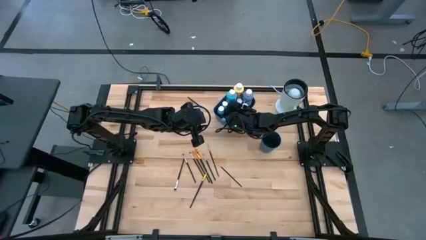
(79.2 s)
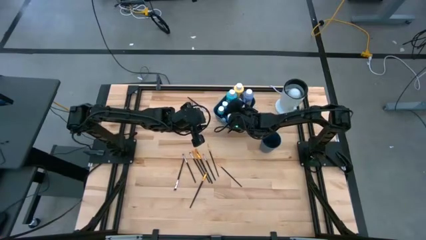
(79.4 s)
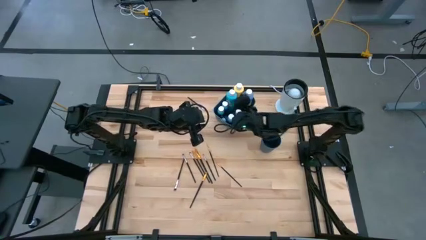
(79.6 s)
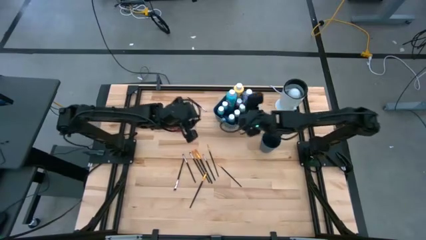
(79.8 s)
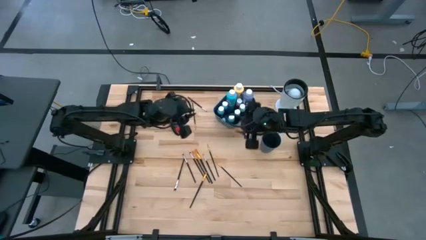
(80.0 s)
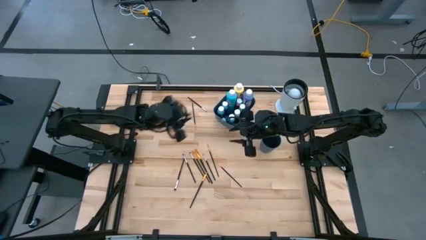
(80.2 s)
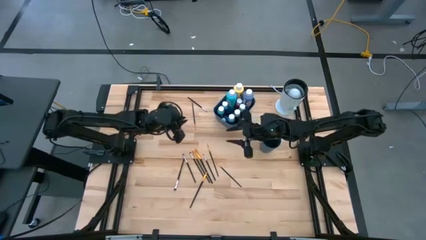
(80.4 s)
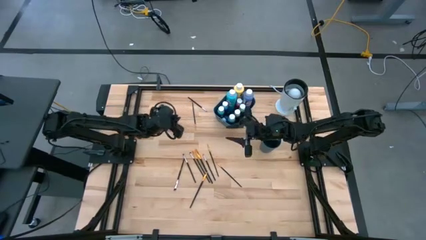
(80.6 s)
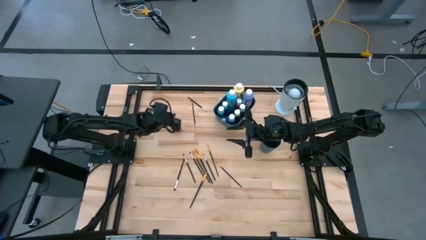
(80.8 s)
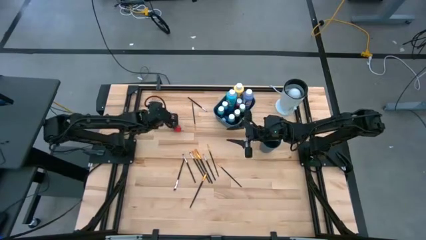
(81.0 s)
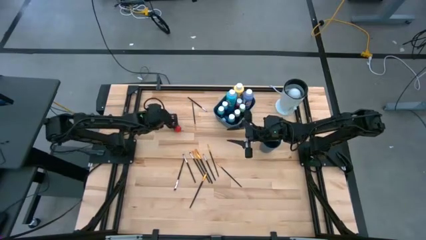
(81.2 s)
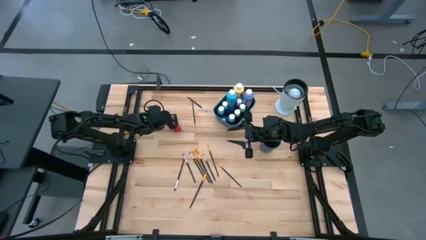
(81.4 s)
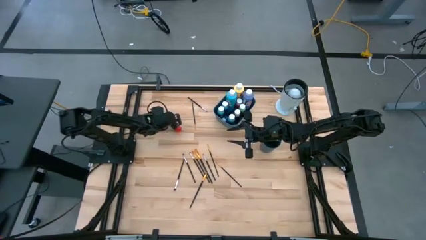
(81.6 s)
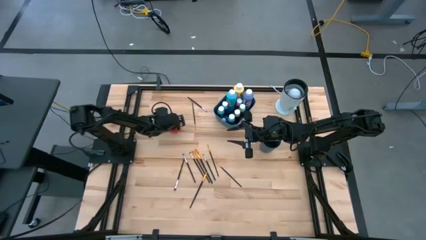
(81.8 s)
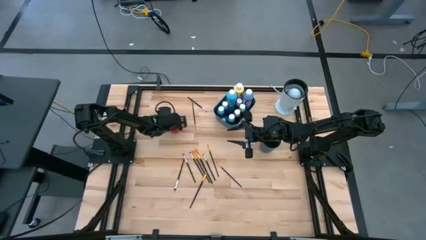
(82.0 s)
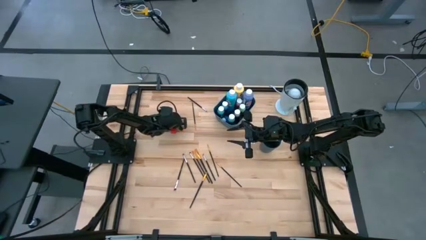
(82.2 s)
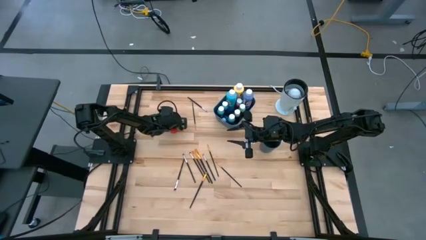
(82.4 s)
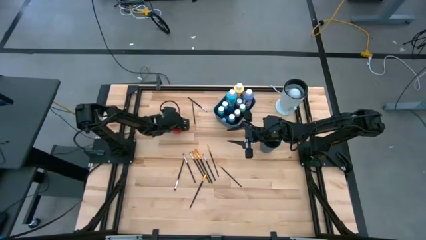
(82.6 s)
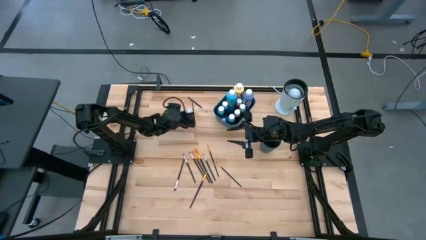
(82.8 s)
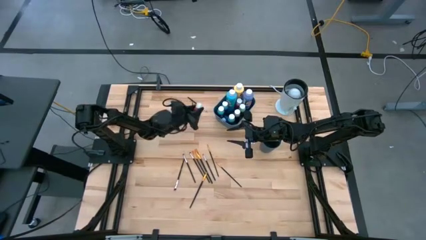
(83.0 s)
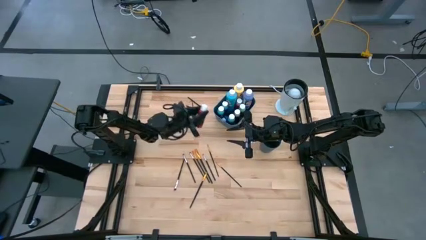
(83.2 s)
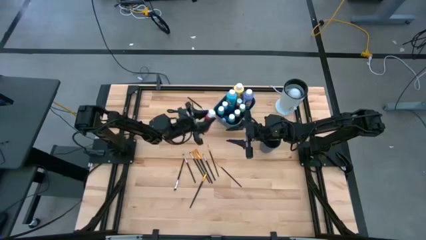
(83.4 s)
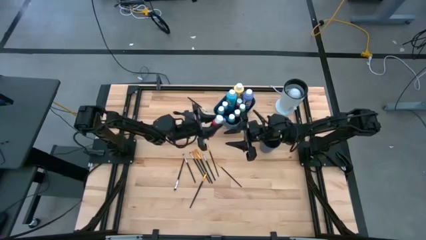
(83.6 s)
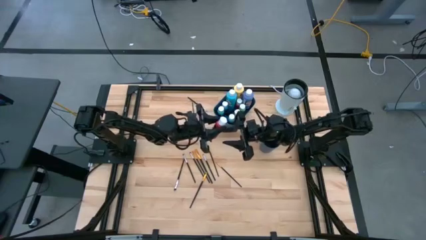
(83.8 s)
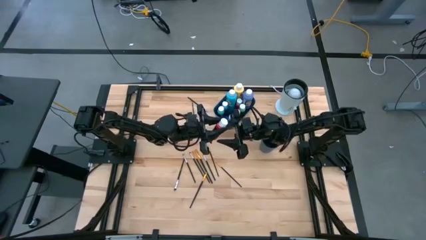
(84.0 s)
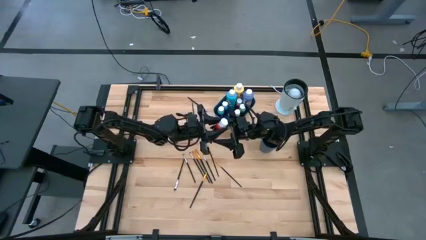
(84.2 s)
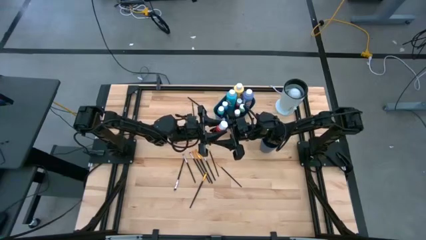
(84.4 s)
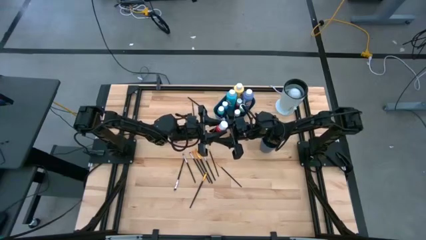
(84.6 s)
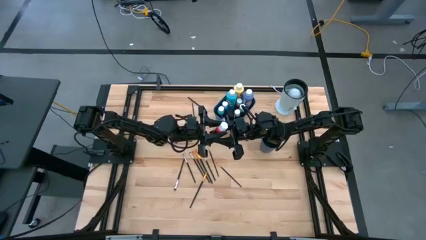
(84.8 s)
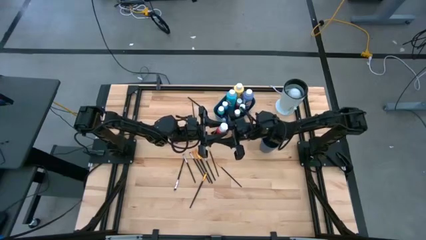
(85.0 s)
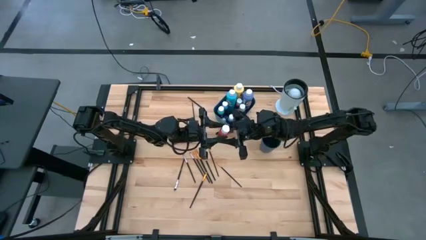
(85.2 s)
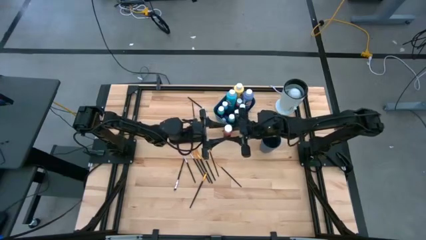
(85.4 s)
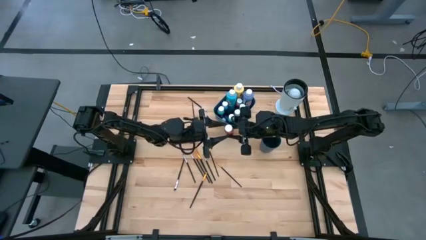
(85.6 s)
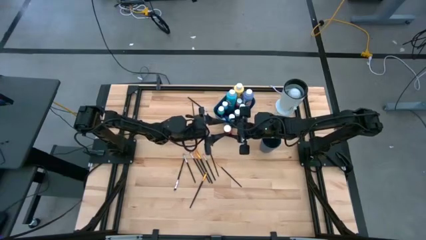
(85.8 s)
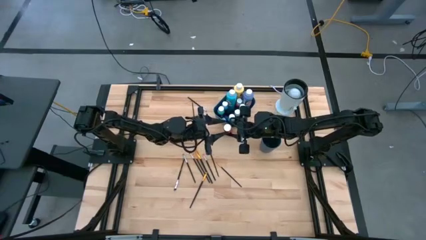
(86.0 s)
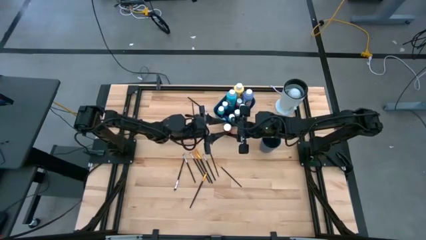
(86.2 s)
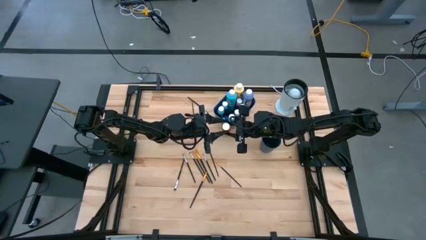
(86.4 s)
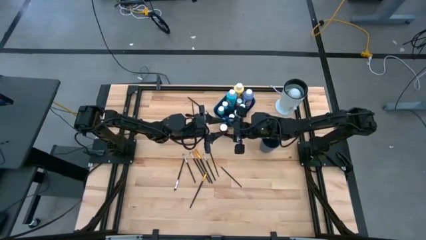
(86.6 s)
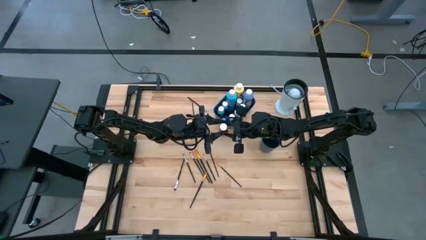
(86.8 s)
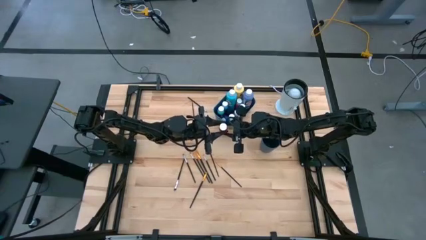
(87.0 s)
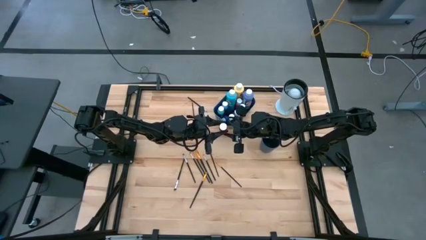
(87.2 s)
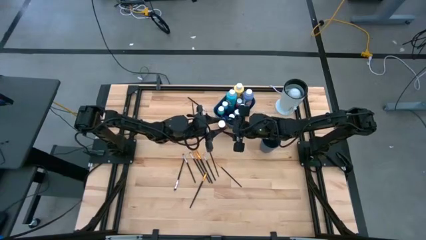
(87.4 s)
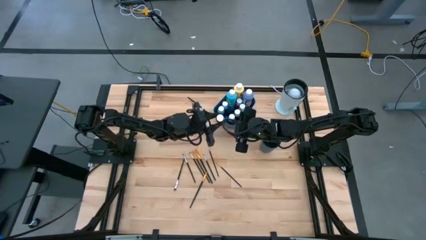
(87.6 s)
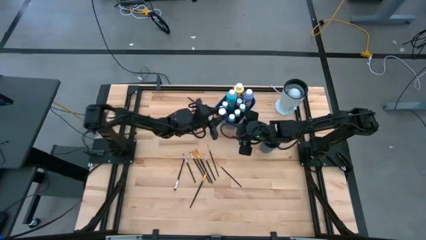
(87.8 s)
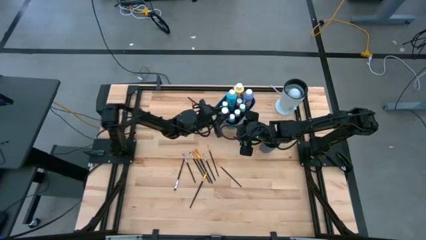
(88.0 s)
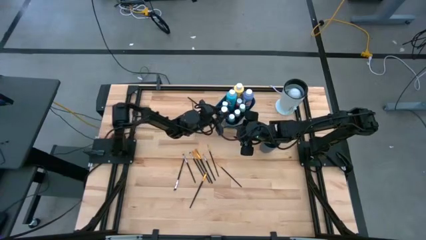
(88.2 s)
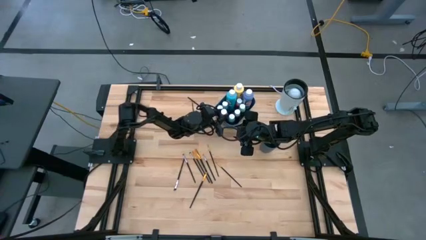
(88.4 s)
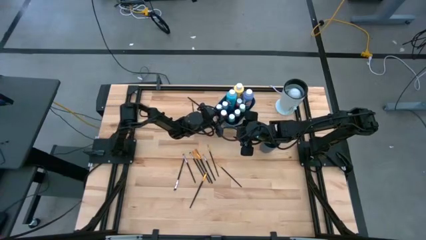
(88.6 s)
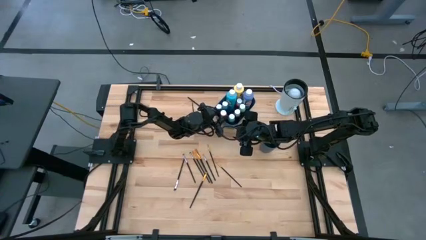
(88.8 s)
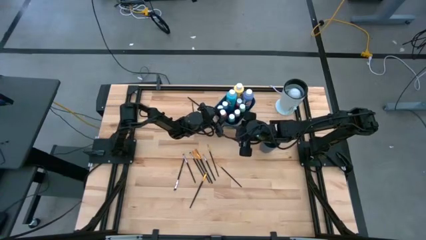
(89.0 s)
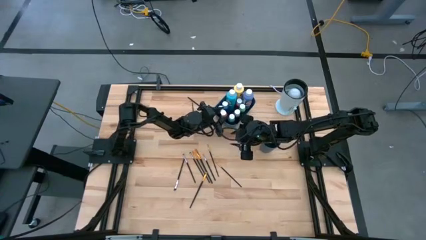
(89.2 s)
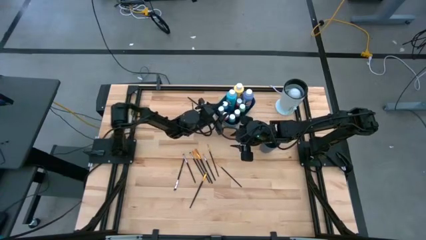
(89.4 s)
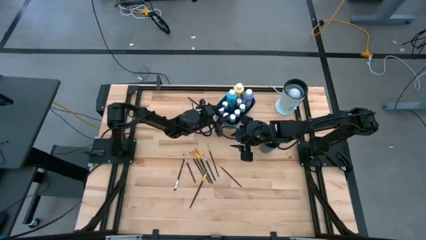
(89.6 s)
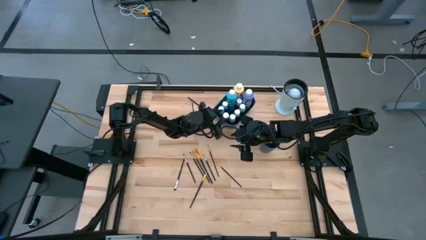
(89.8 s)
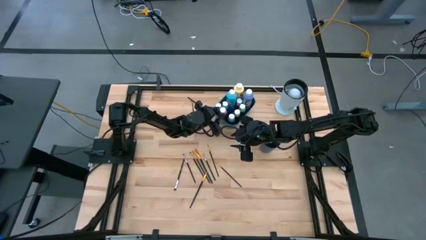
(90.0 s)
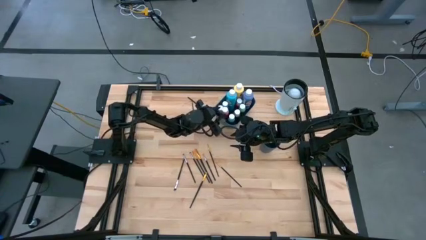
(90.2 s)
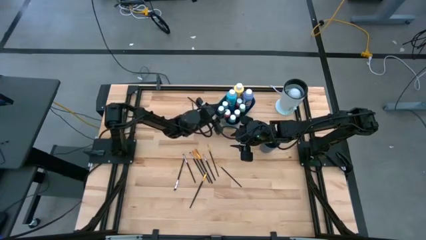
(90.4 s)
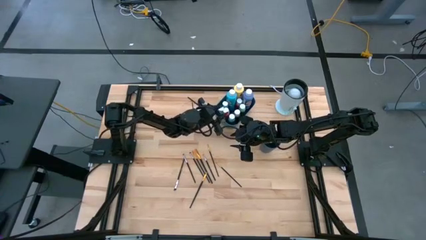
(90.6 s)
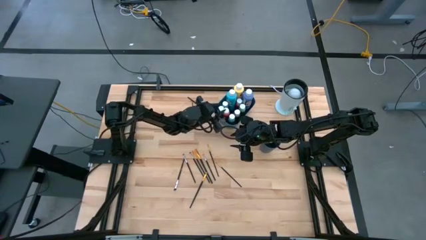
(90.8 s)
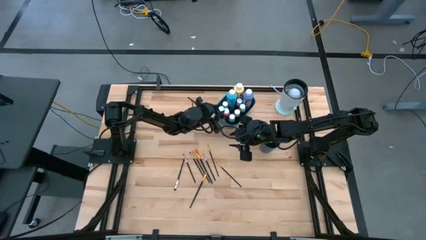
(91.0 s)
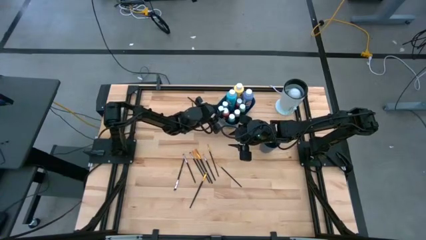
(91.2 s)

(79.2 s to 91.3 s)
Task: Pick & Place Paint Supplies
Put the red paint bottle into the blue bin

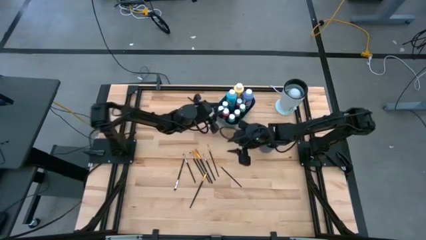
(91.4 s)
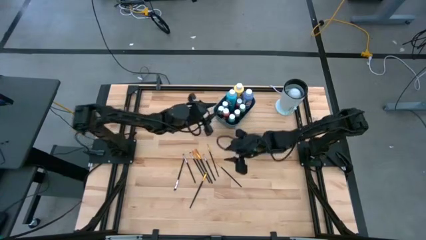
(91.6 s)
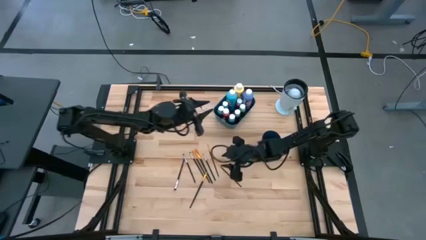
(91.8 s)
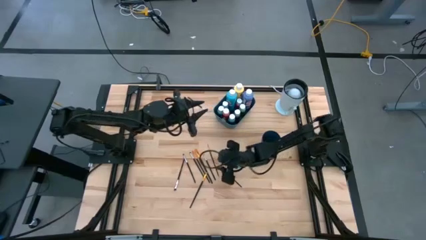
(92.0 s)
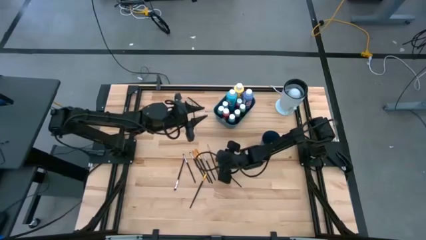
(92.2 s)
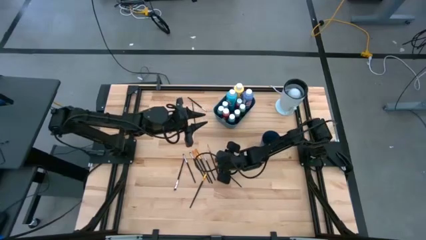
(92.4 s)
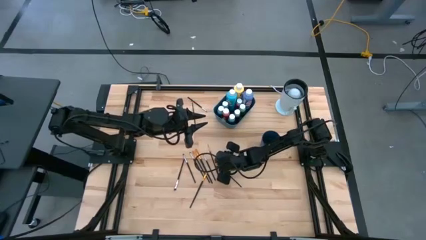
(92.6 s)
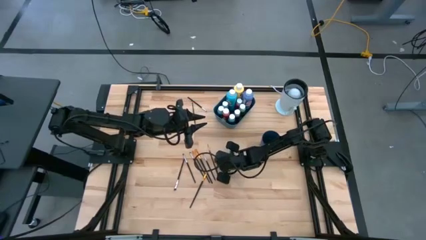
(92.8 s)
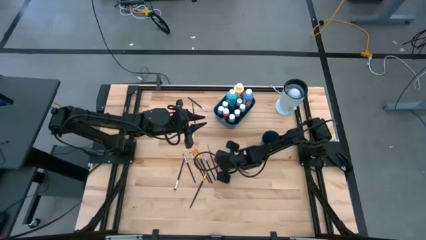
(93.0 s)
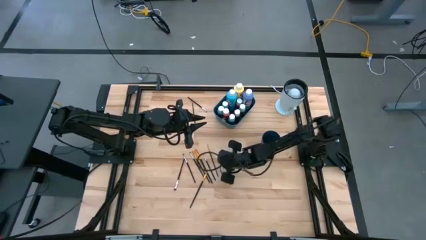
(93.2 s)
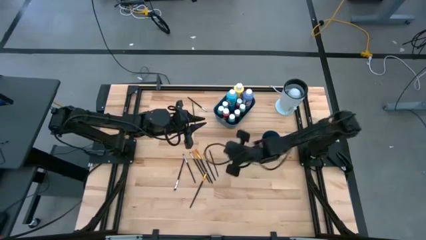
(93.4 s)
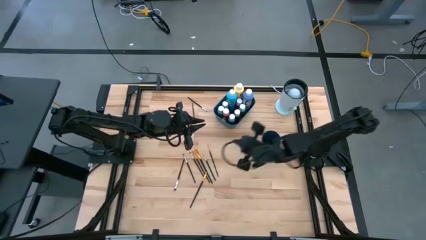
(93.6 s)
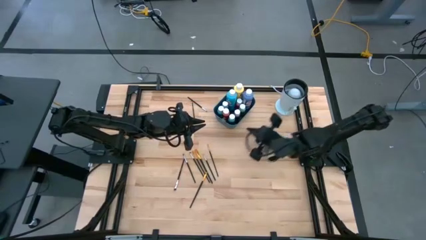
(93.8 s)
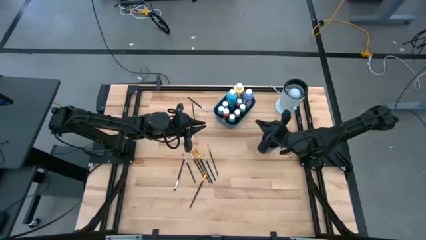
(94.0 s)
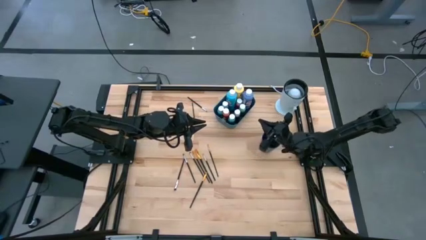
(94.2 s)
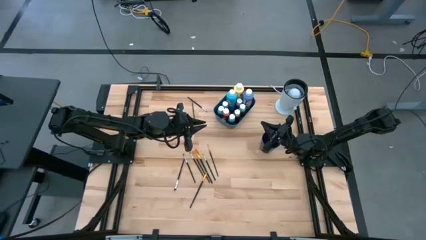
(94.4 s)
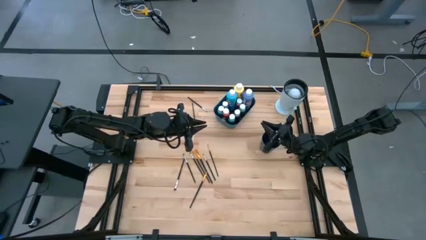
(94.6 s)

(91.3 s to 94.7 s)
Put the golden paint brush into the blue cup

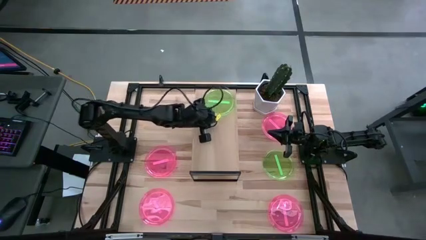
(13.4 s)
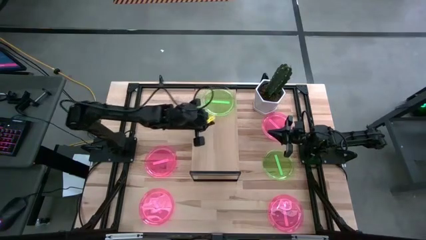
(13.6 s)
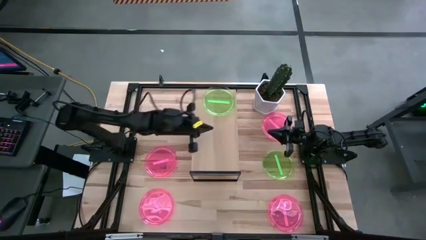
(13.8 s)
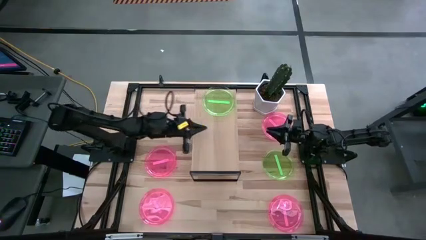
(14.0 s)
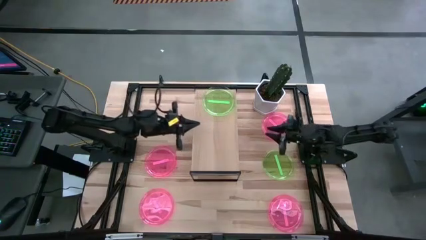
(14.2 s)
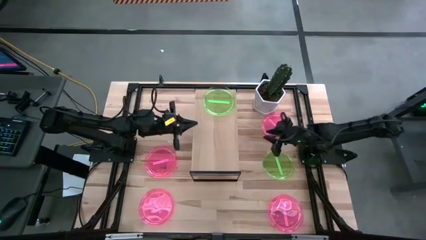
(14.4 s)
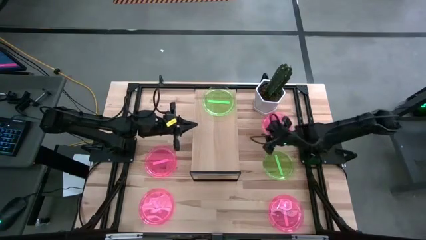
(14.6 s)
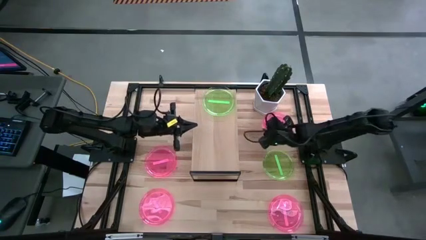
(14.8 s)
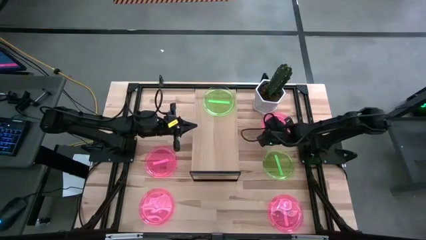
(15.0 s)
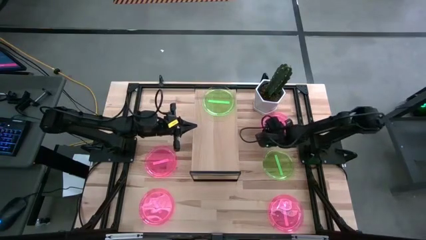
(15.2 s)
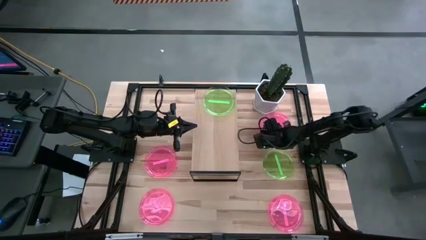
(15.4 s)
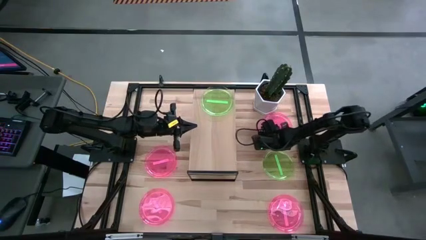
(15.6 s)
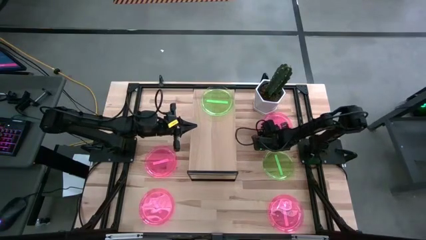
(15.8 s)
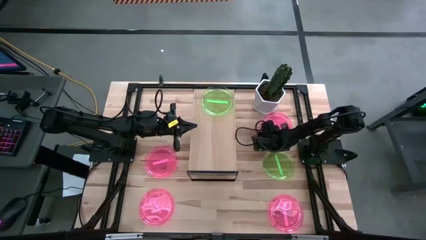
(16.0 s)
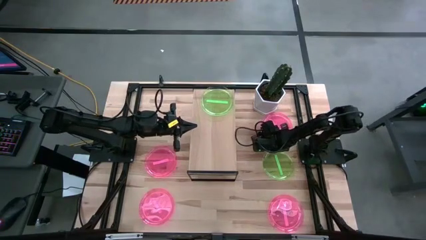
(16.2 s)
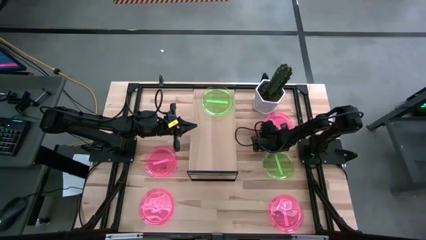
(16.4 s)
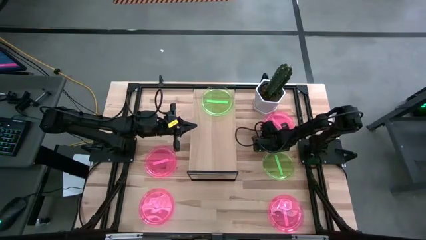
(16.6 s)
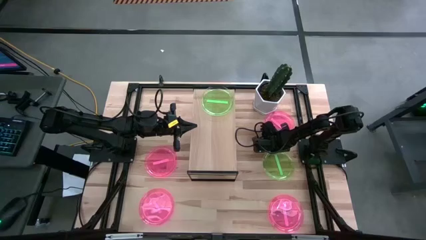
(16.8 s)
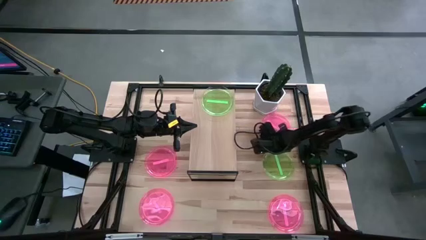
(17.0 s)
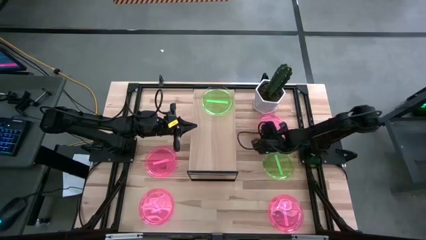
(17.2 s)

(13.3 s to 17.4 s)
Task: Place and stack plates onto a shelf
Put the pink plate on the shelf
